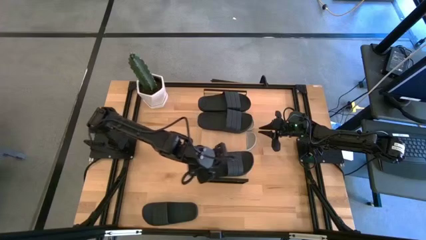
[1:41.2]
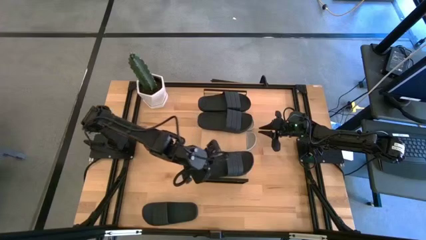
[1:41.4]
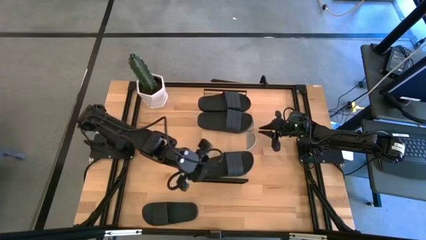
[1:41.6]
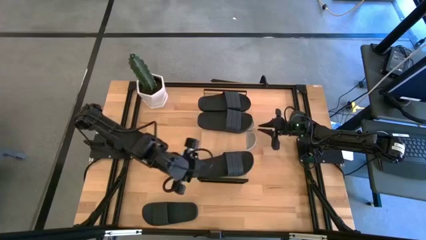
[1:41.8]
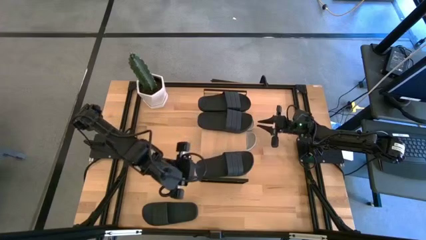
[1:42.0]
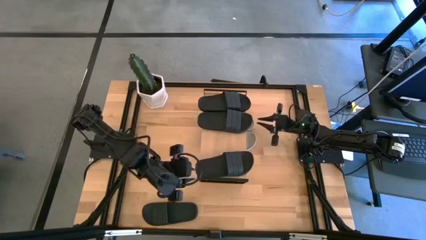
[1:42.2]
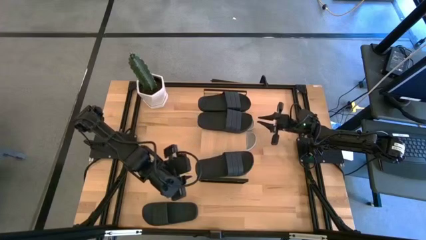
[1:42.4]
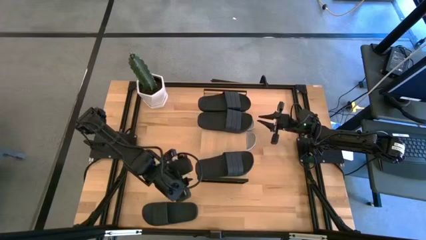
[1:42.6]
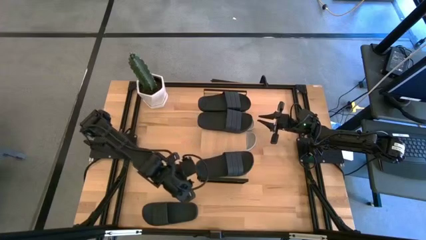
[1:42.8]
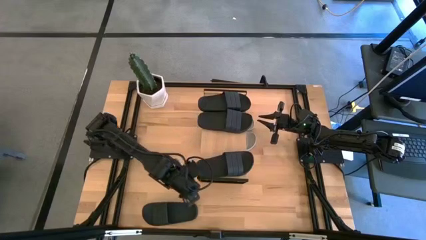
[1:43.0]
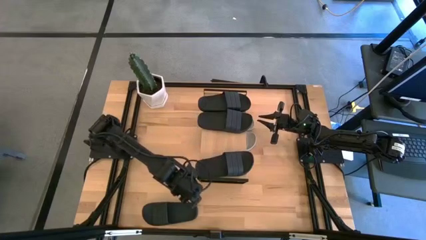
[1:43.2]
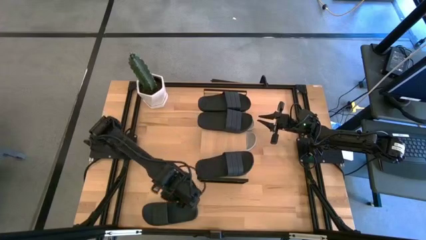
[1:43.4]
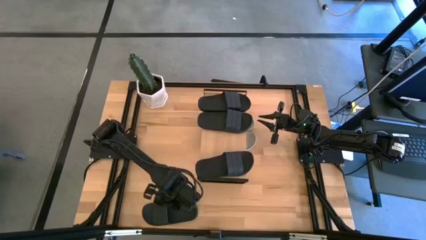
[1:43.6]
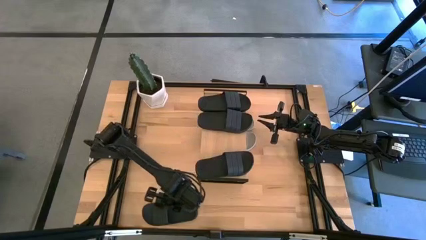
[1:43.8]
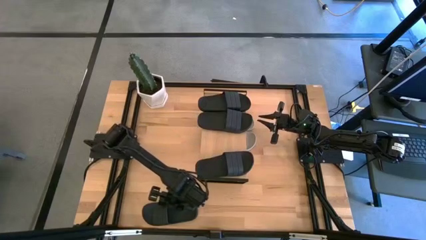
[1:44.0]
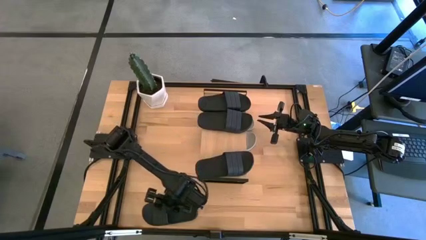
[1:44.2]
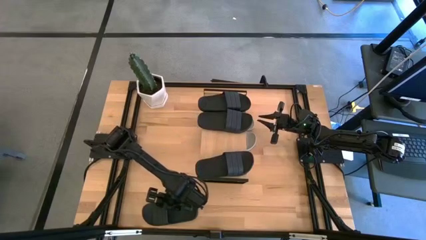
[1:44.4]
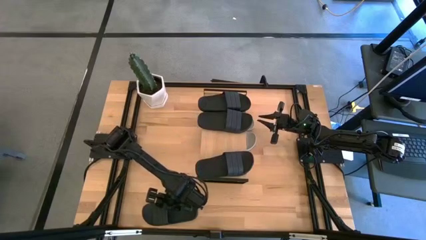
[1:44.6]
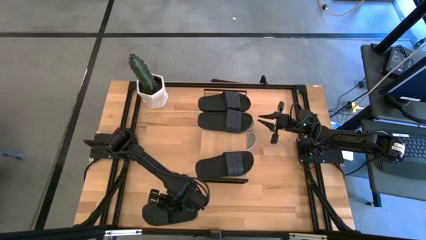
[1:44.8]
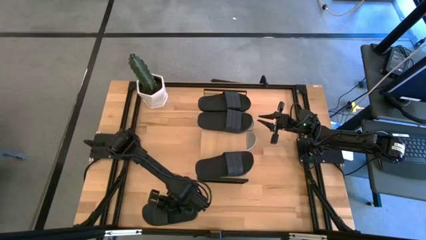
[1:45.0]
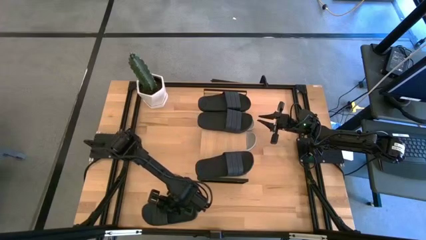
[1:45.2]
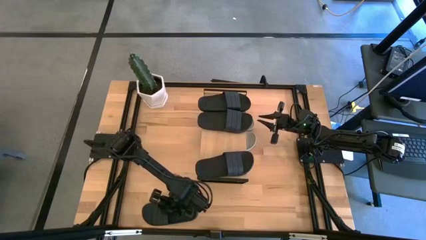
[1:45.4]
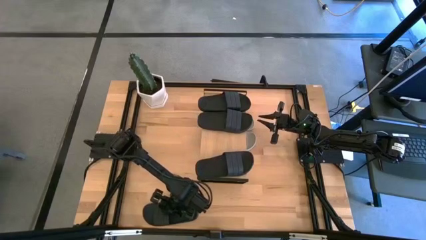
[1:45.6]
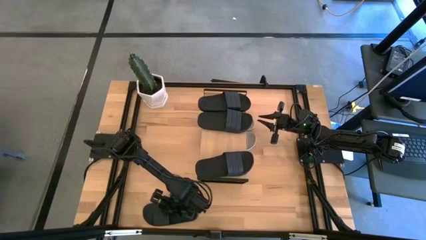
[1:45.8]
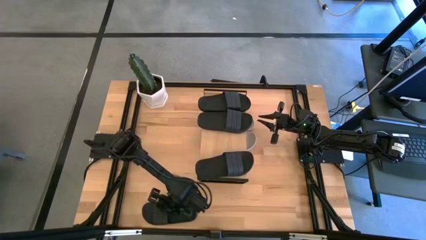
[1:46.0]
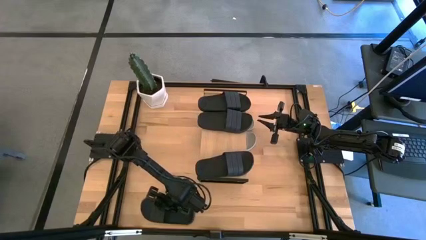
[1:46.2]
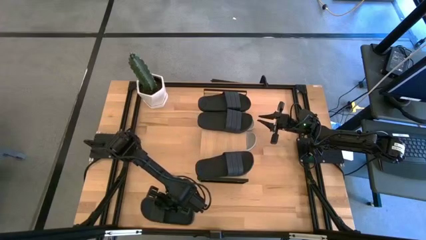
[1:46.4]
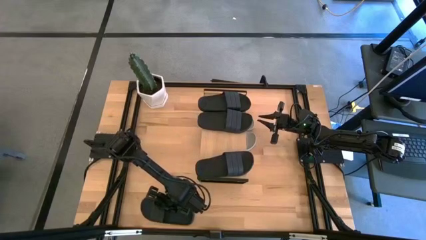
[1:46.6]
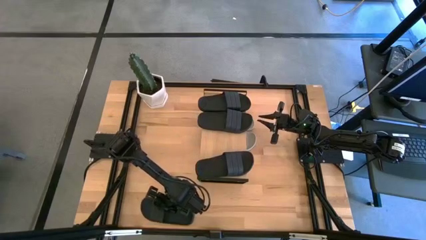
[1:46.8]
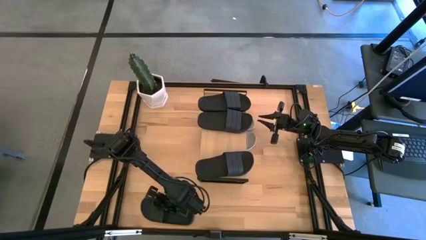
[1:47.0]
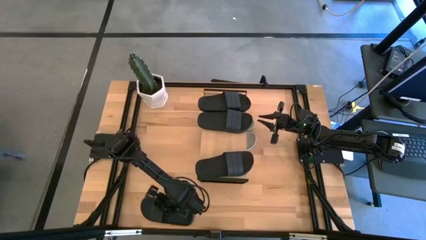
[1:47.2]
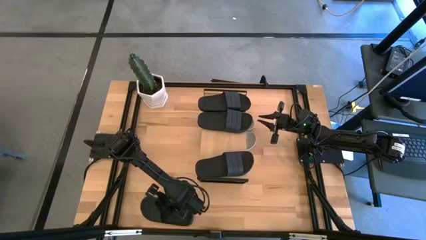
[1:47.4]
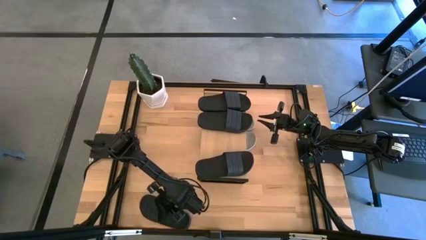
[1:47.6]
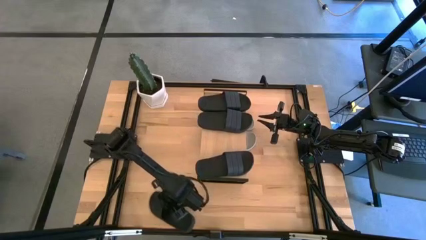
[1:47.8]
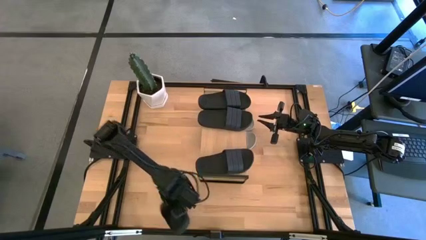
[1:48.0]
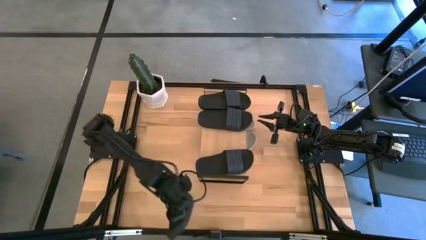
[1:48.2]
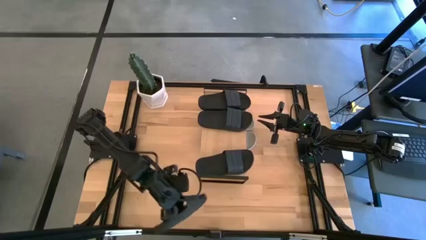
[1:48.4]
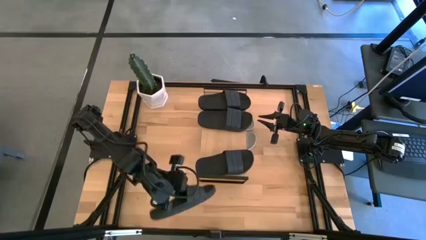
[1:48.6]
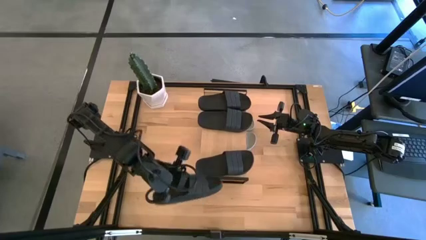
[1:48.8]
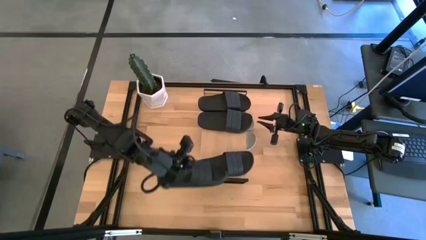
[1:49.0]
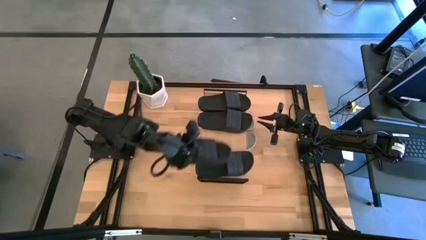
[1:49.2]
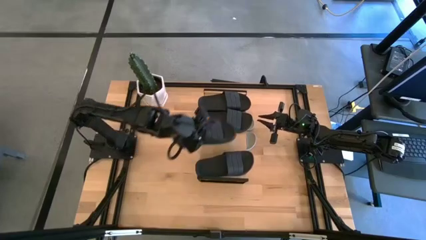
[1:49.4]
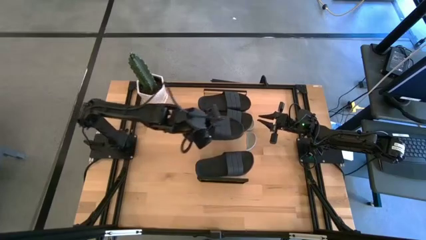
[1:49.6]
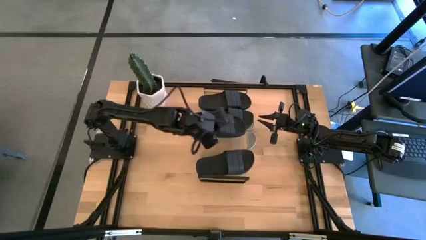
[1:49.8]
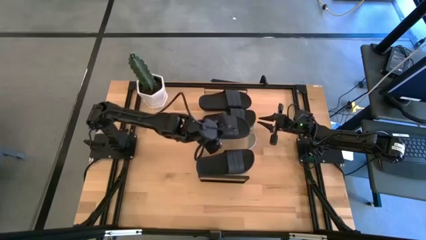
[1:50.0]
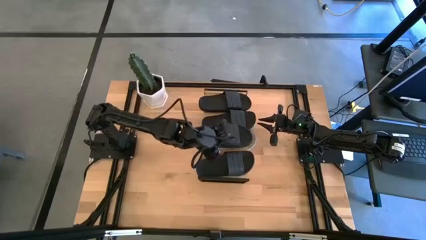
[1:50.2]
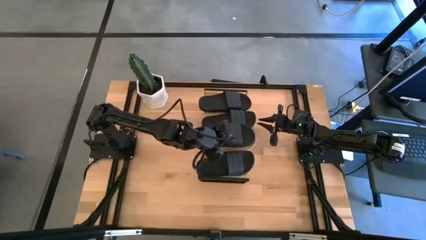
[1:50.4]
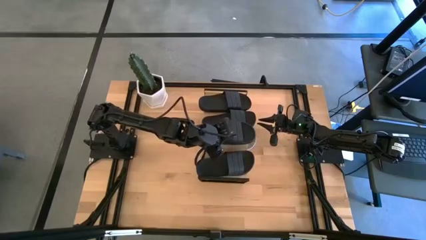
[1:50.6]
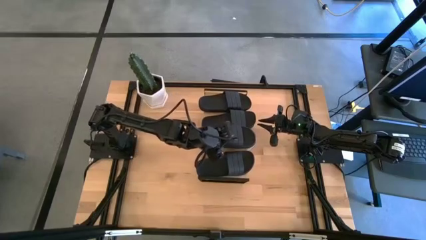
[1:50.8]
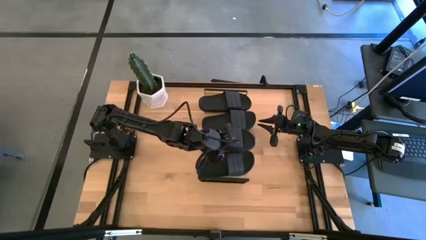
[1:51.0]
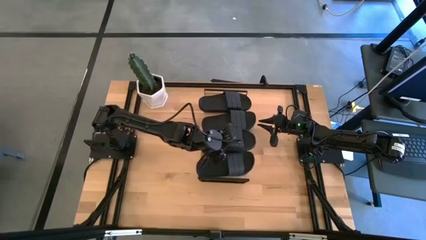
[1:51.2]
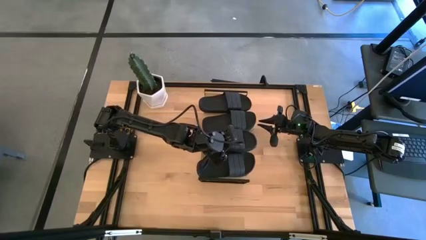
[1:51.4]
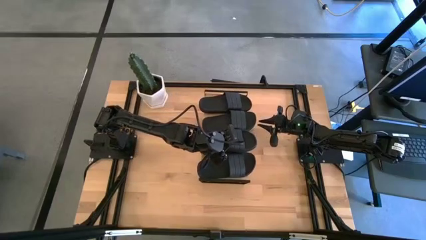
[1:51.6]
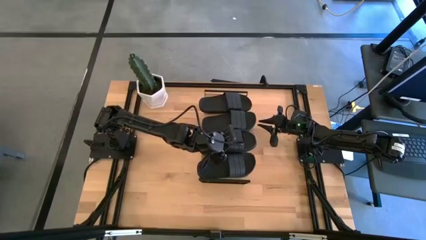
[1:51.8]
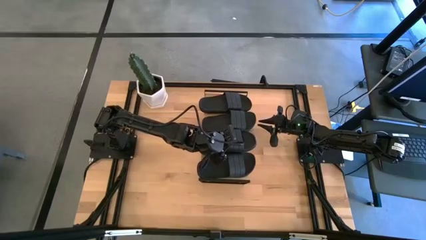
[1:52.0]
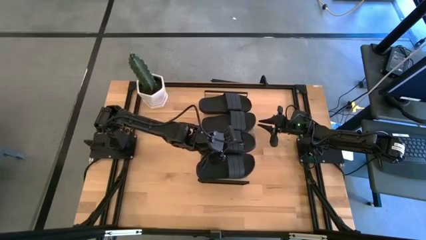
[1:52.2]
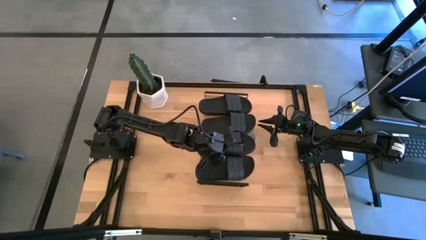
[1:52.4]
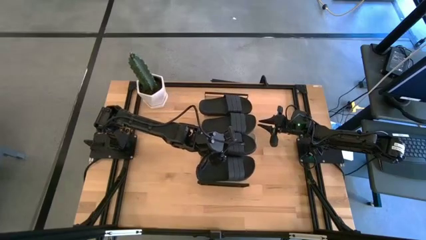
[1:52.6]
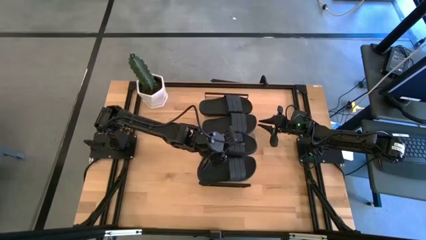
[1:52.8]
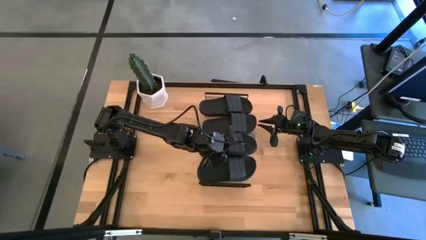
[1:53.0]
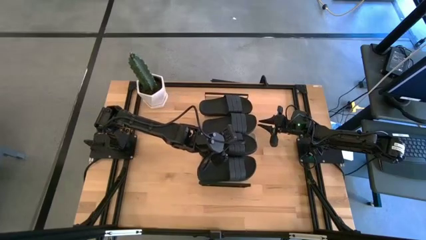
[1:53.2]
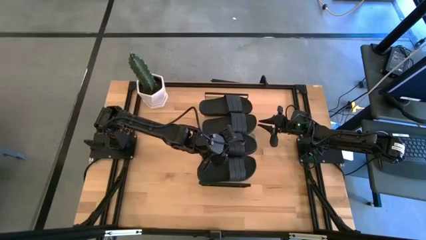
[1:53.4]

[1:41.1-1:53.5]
Task: Pick and place slides into the shelf
Put the black slipper on the shelf

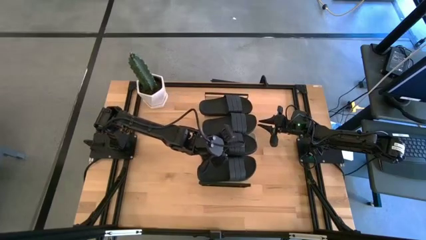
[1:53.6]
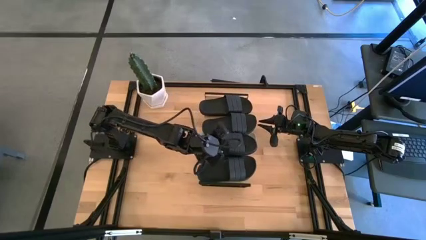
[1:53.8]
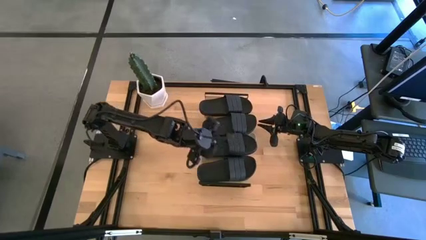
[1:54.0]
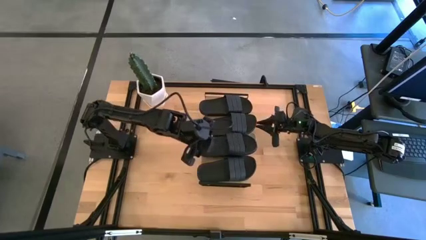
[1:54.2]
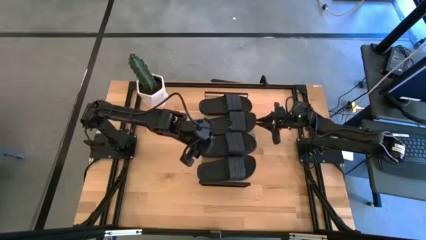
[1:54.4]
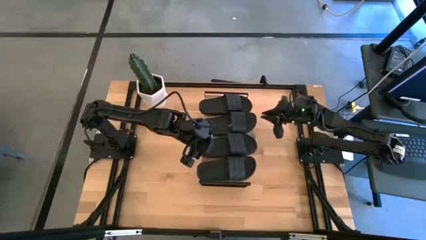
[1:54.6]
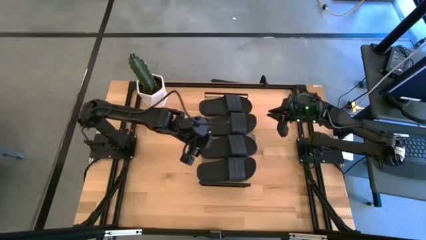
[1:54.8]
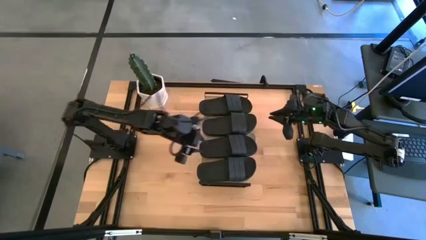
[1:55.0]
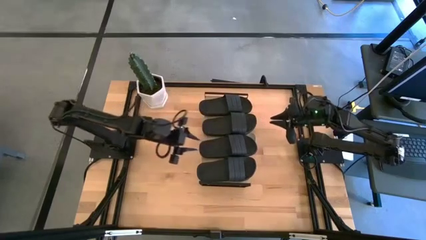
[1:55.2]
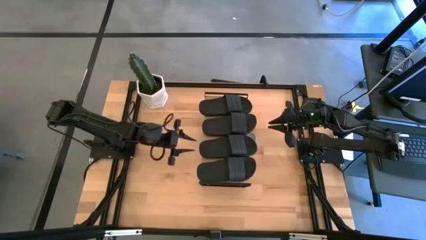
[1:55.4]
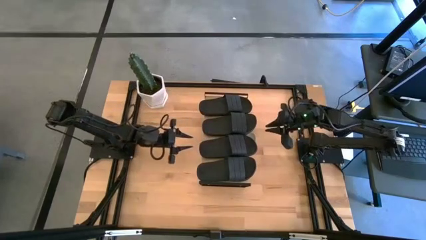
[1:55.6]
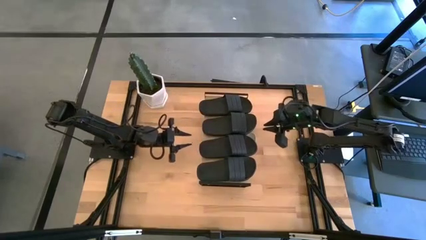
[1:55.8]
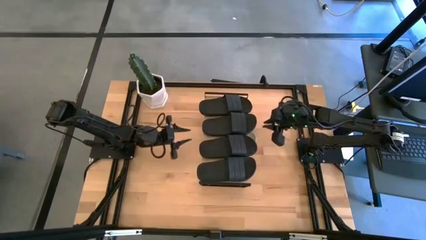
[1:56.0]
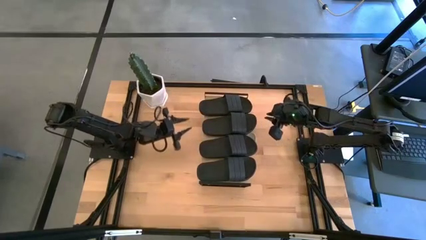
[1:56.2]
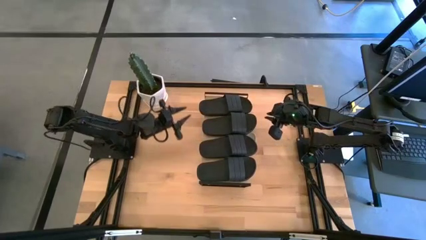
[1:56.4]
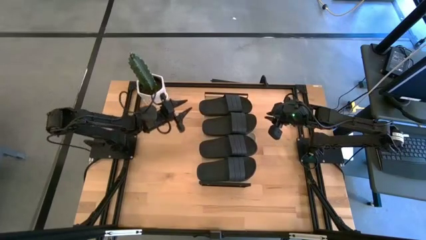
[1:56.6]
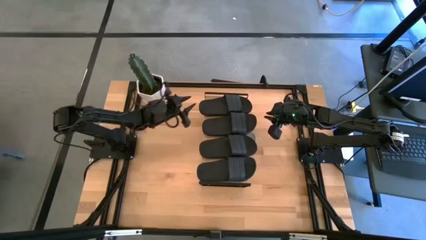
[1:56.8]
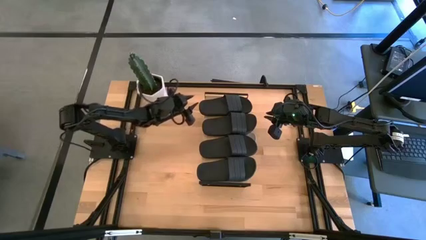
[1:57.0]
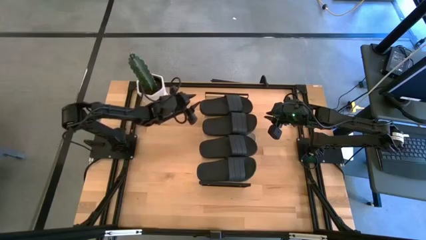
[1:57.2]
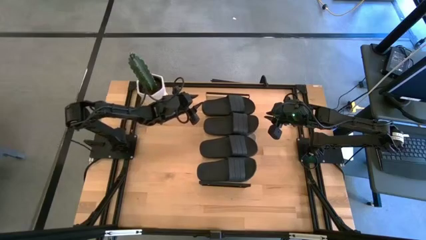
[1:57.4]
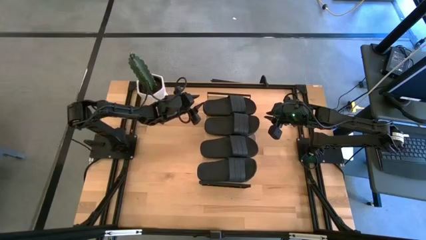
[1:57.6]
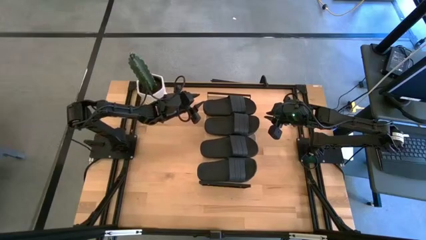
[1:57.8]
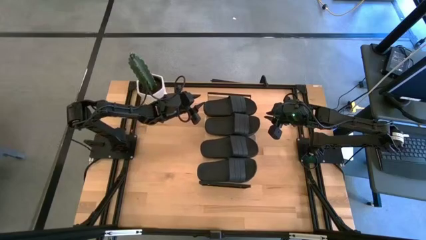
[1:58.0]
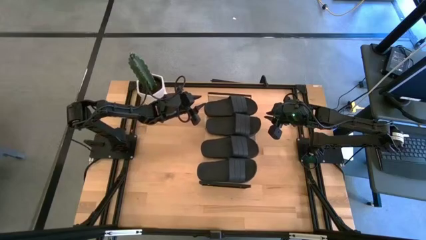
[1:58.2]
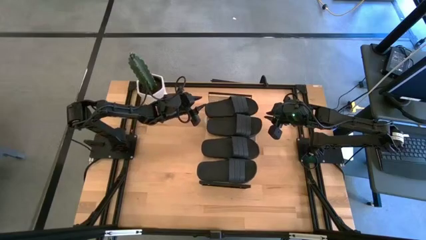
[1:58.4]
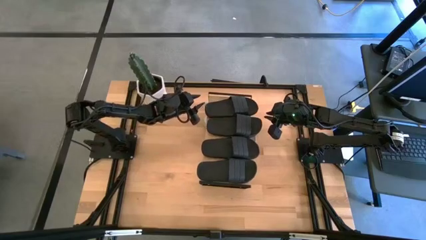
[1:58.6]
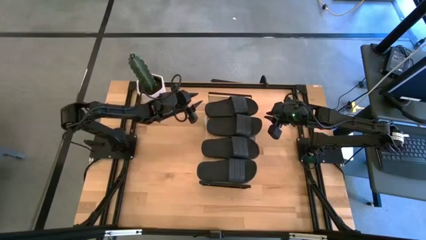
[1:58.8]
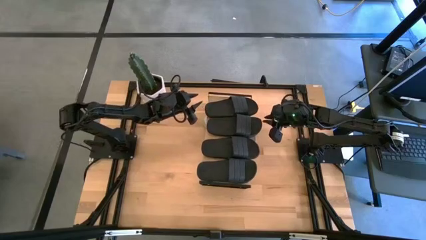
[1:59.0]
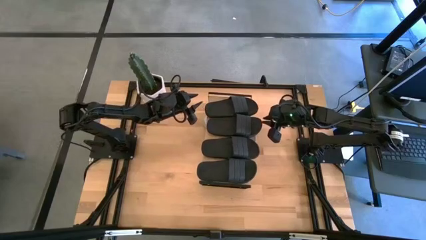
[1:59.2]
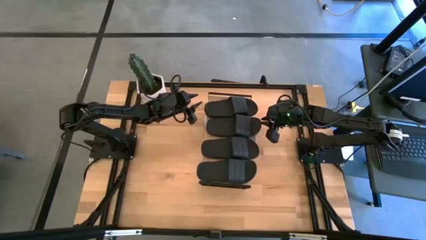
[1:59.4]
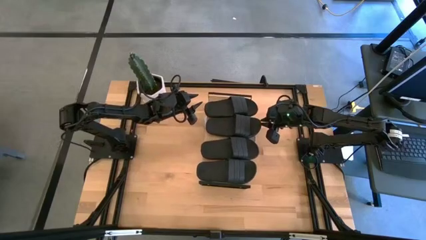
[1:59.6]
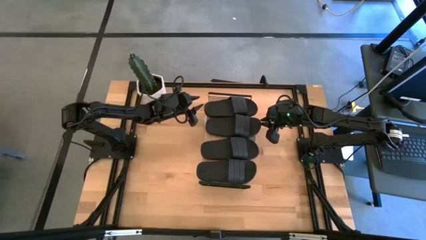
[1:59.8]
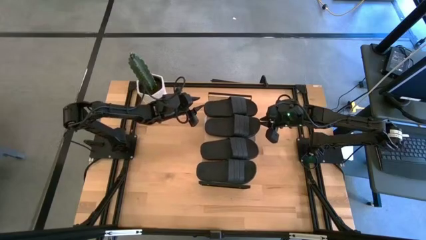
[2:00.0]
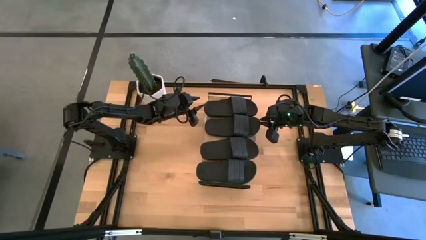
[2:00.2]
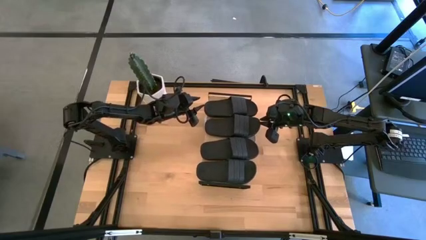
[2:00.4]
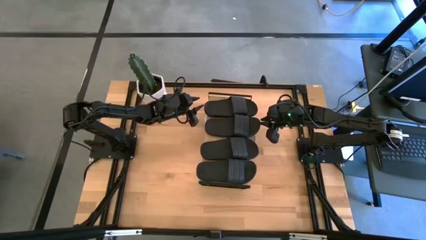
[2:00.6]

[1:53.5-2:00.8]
Adjust the black slippers on the shelf
